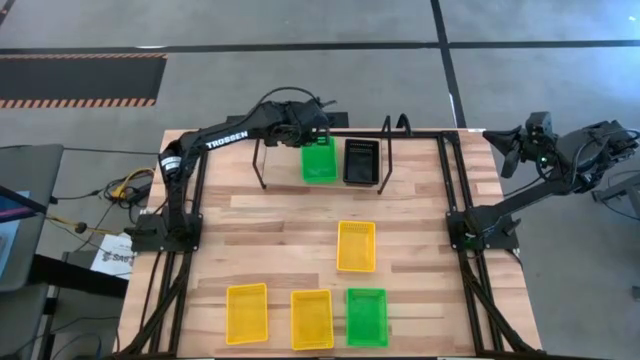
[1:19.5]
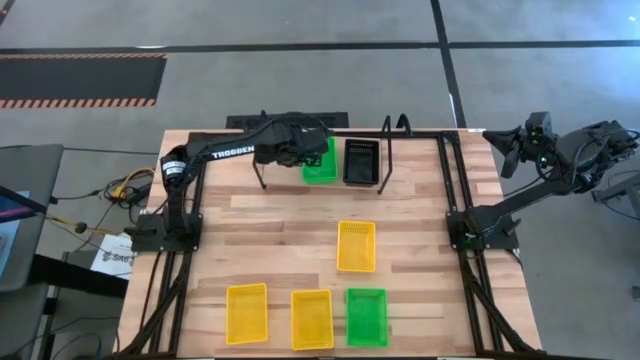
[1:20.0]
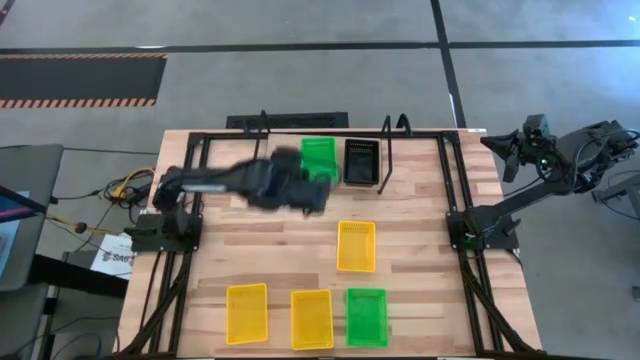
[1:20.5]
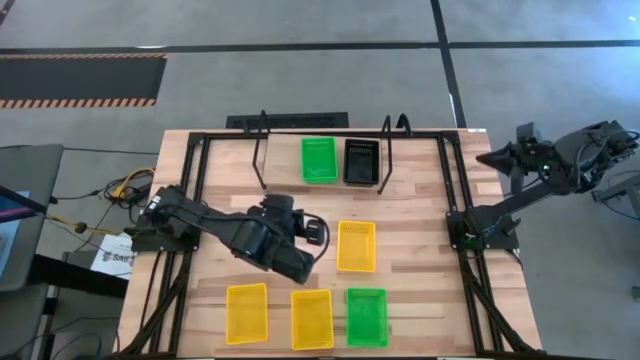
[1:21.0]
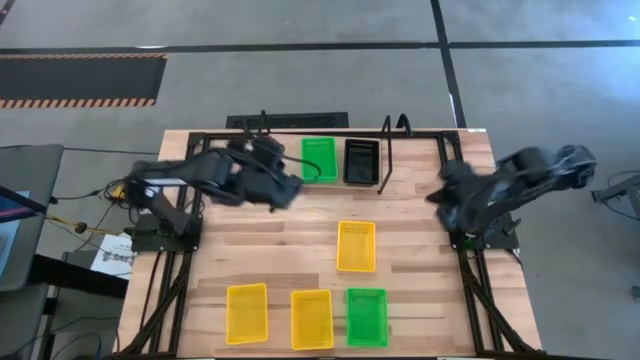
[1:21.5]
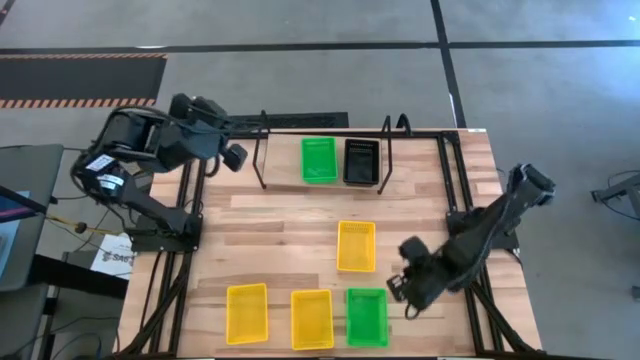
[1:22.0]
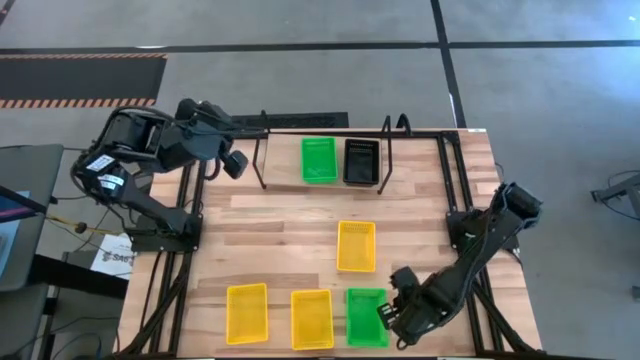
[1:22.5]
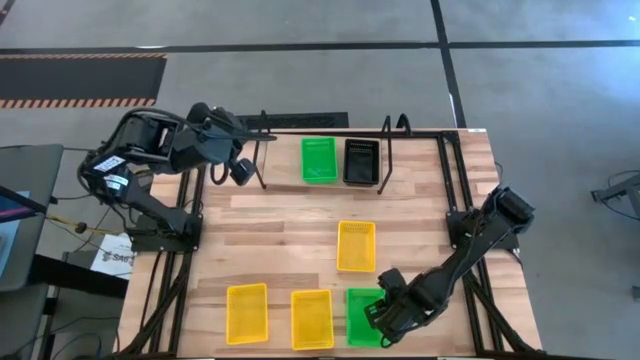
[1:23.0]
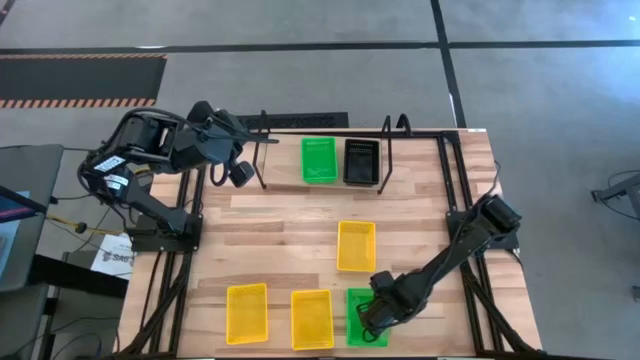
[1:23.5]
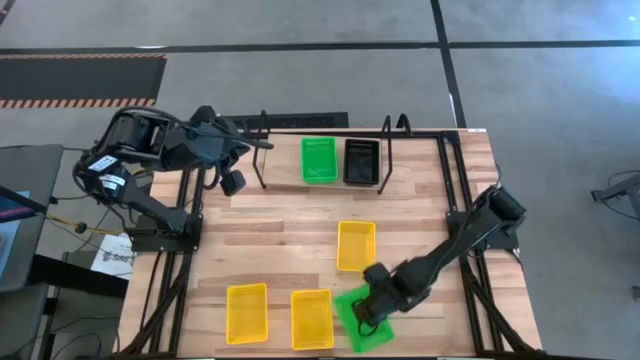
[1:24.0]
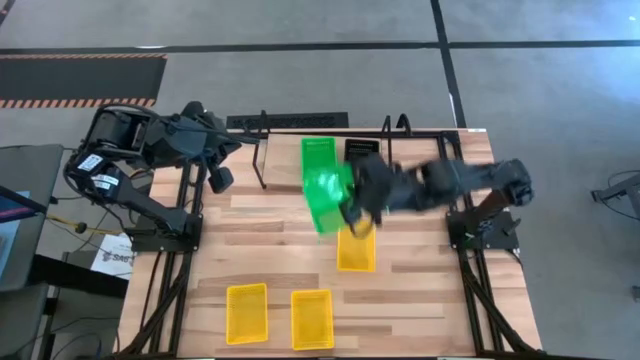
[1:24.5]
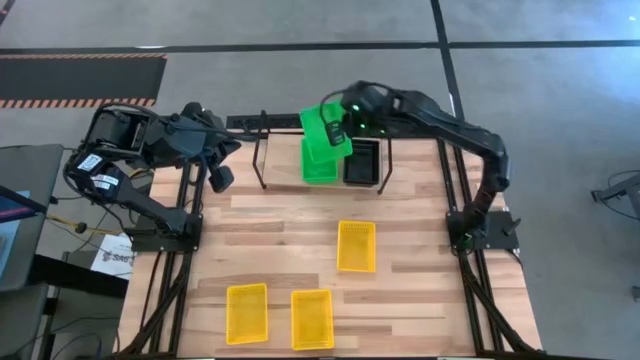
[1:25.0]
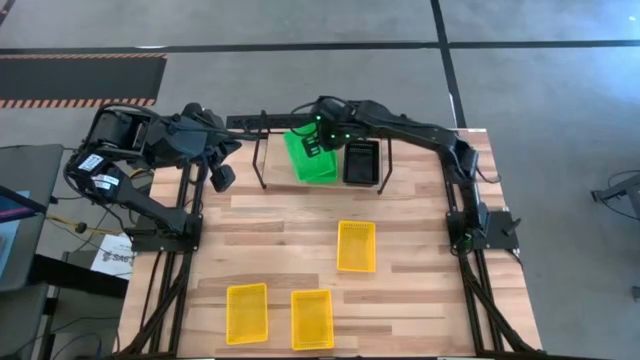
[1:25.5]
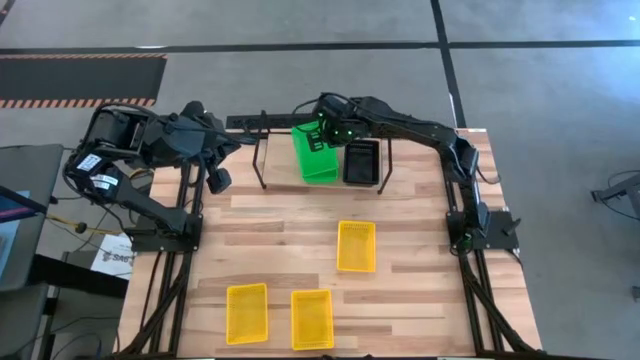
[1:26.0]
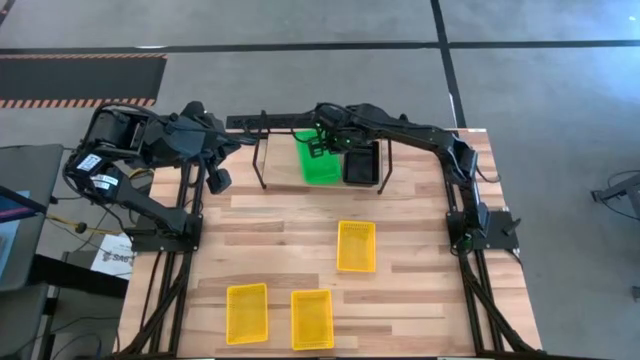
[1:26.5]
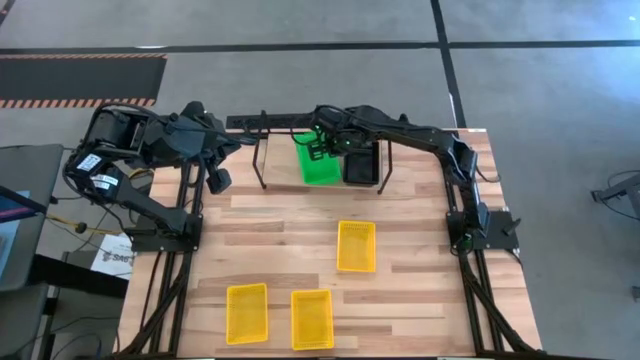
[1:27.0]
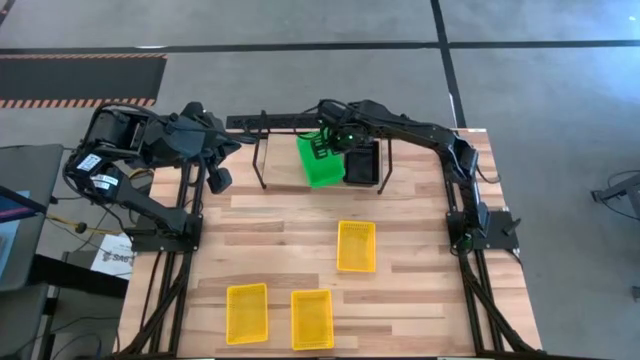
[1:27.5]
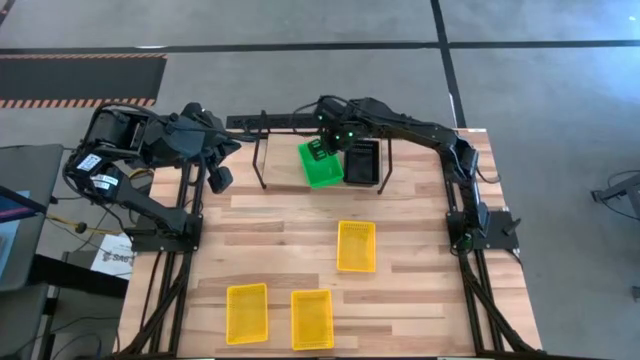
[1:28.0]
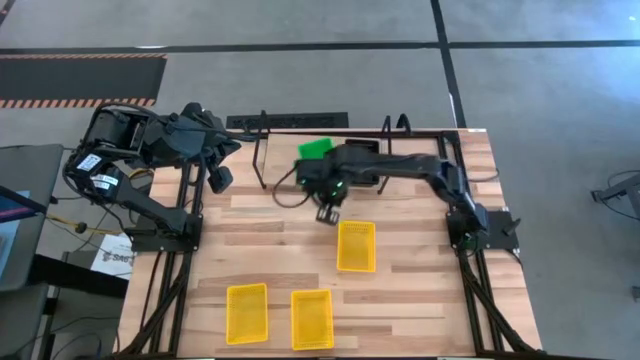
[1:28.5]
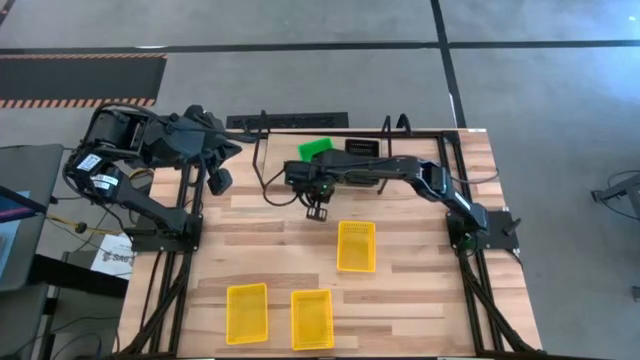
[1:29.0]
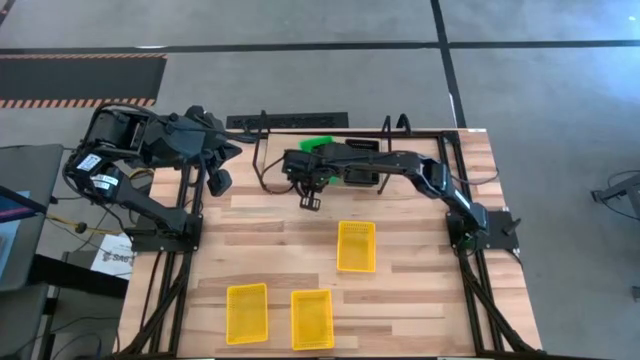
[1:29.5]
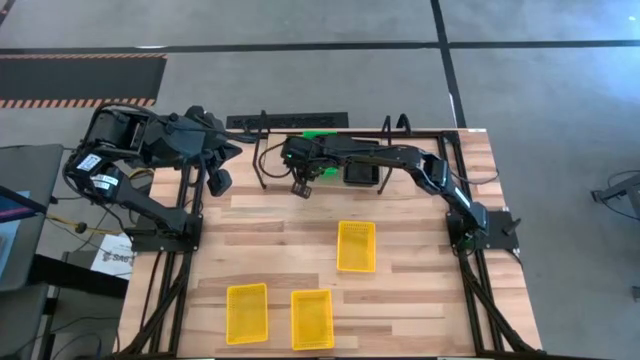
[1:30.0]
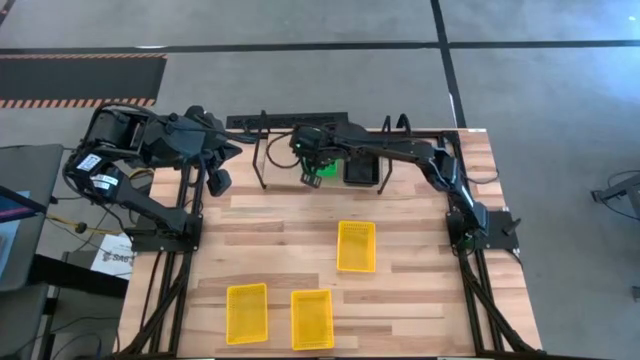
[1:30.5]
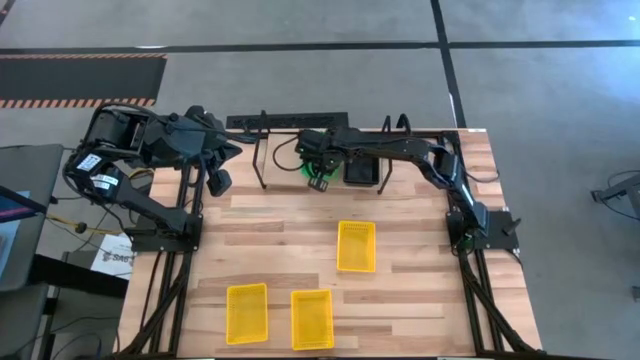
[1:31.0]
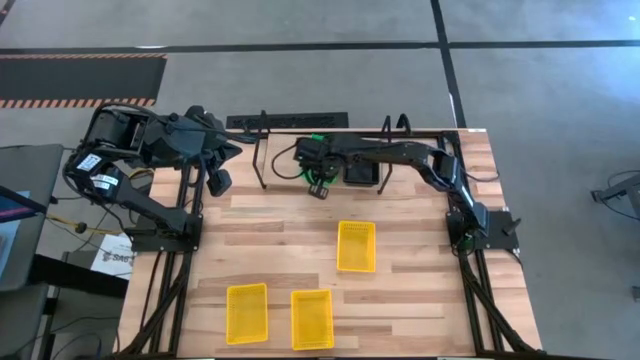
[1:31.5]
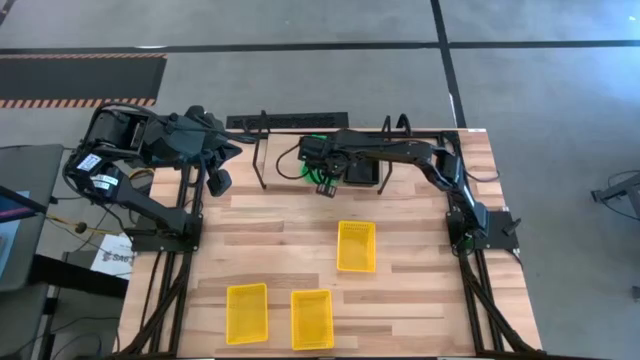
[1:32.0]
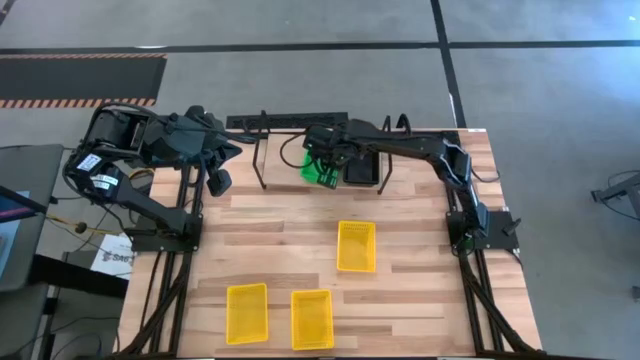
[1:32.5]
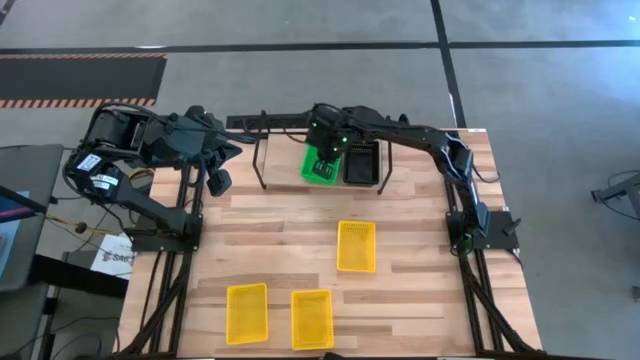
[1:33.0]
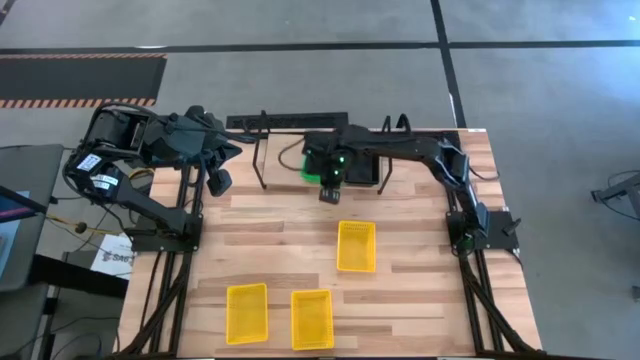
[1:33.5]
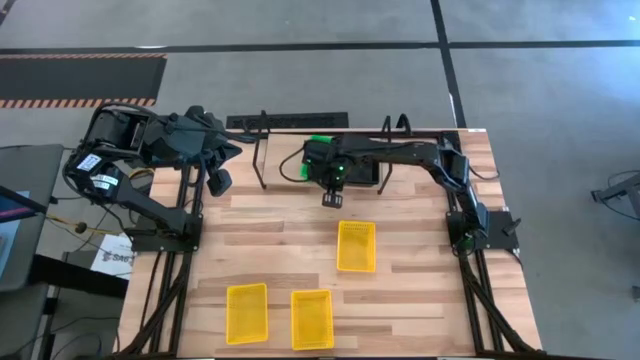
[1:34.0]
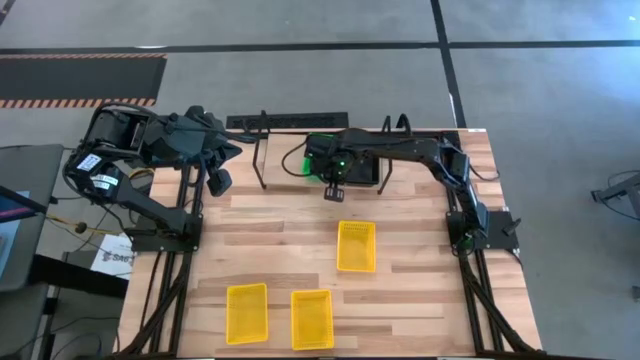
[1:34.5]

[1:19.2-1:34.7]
Task: Stack baskets on shelf by color
Stack the green basket on top of the other green stacked baskets on the shelf

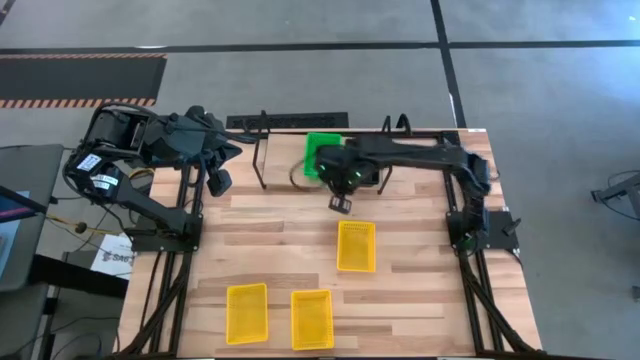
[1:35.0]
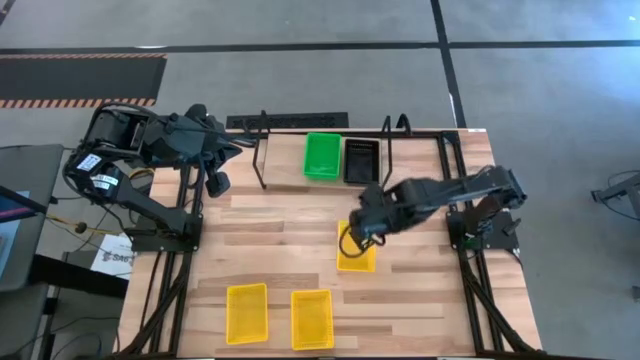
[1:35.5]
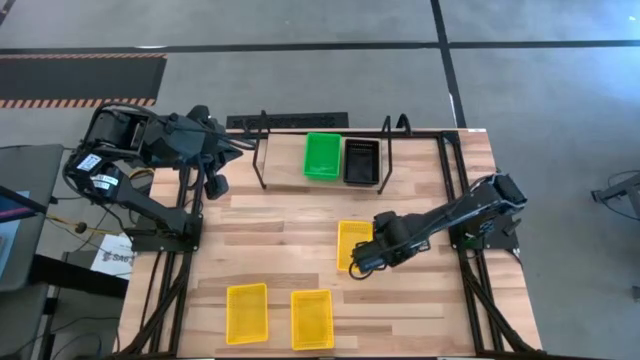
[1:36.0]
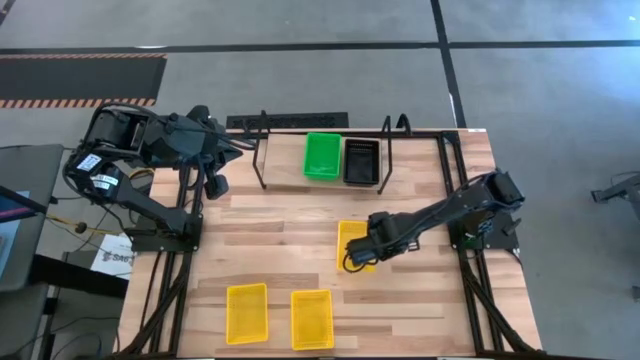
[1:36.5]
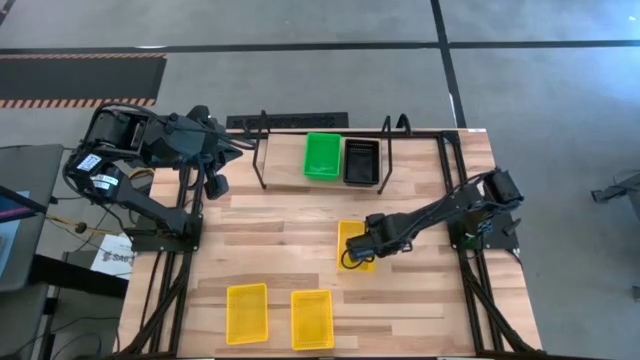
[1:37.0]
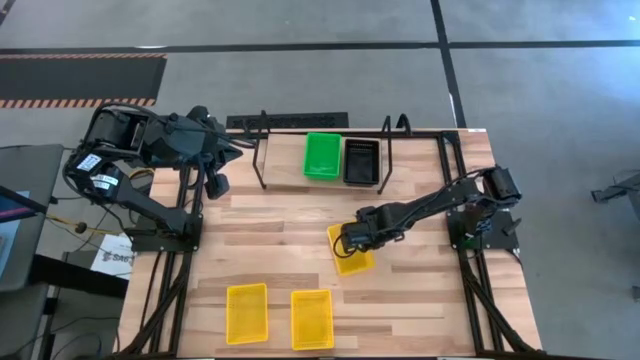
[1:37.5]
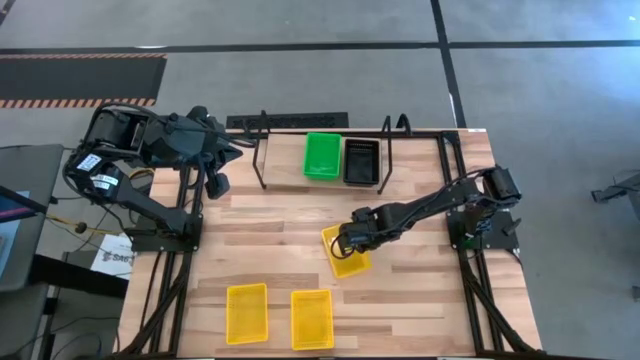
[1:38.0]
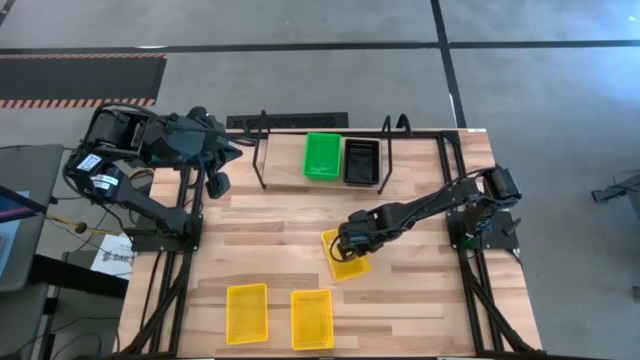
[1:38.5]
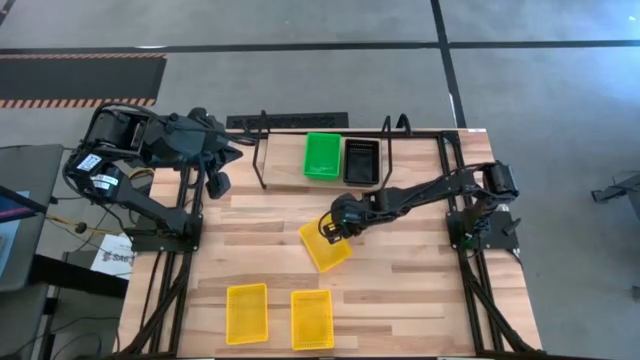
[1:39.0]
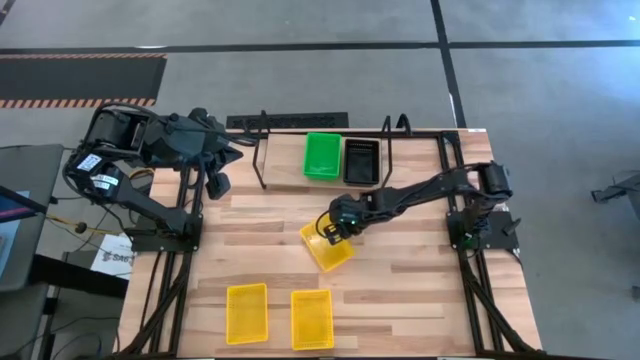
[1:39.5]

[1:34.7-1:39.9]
Put the top yellow basket on the shelf

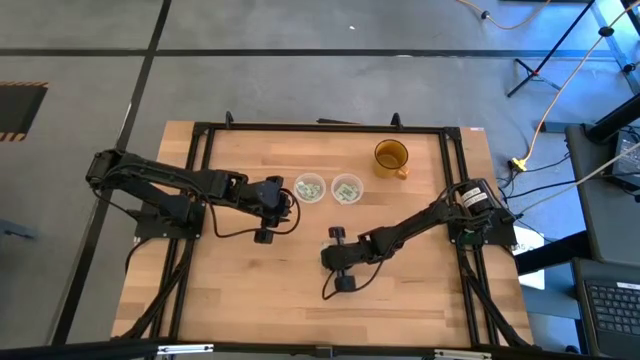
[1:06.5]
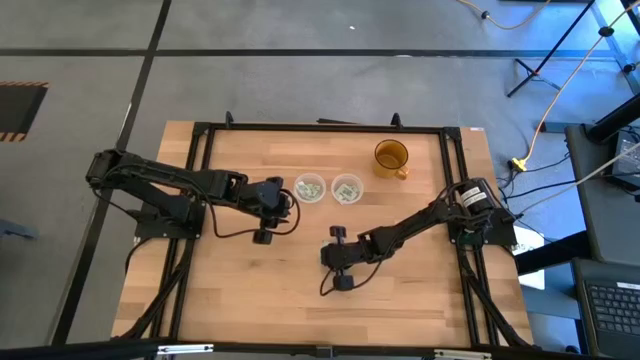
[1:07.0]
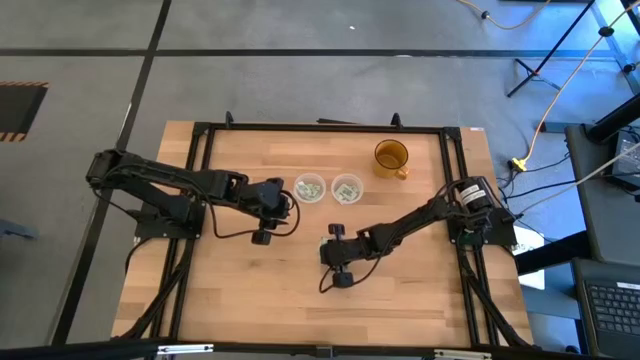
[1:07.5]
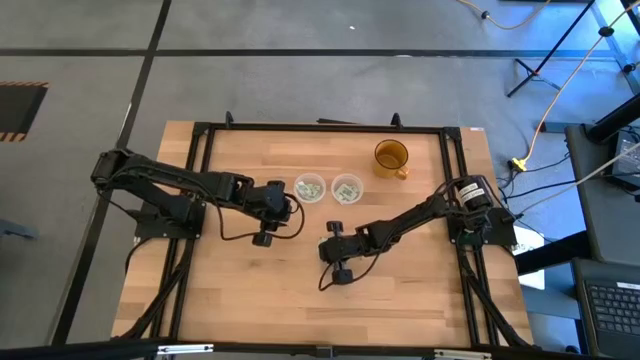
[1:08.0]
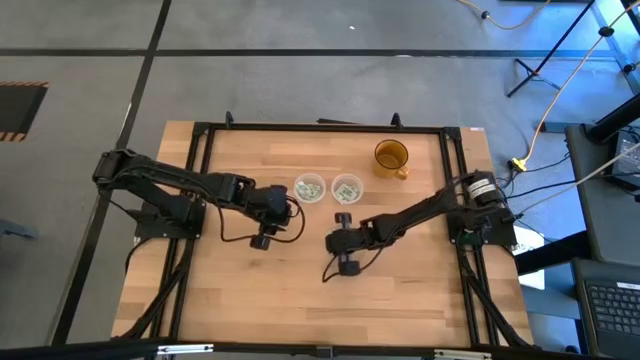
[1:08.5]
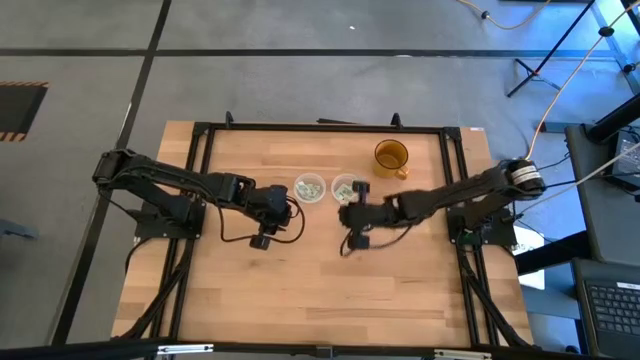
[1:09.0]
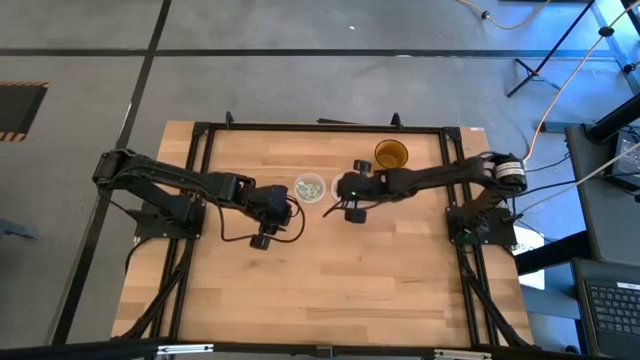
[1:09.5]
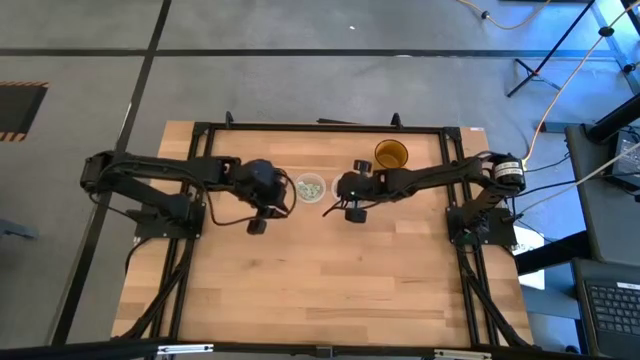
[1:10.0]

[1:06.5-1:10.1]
Task: Pick and place Stevia / Truvia into bins
Put the stevia packet into the right transparent container
